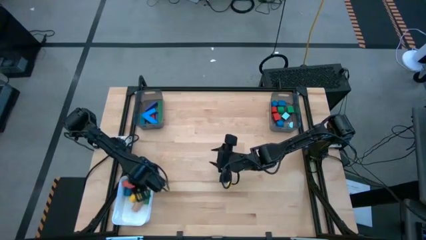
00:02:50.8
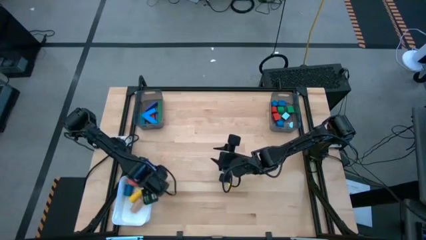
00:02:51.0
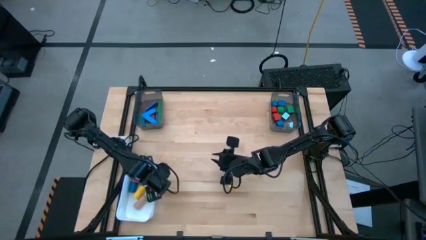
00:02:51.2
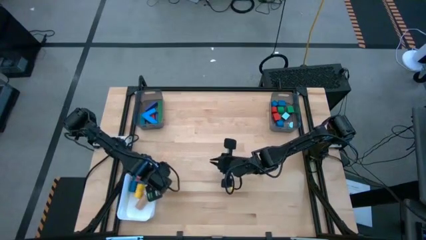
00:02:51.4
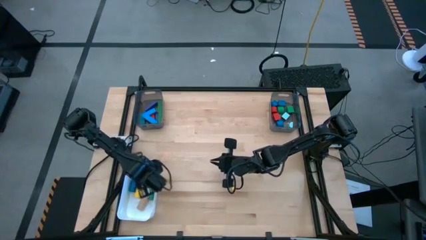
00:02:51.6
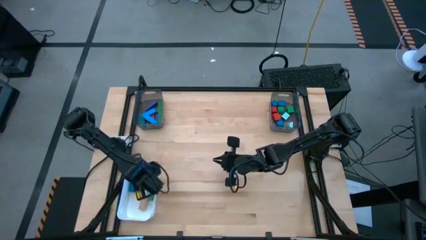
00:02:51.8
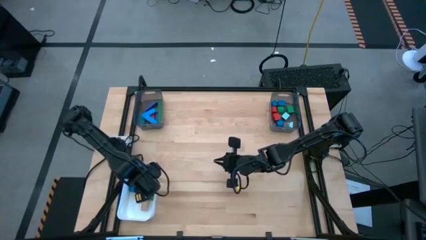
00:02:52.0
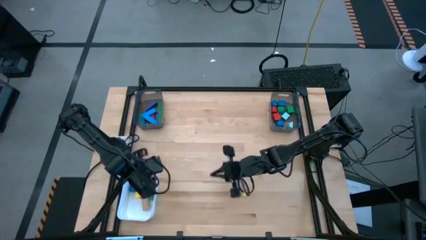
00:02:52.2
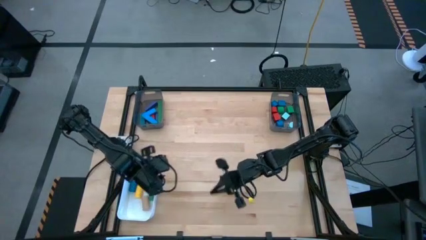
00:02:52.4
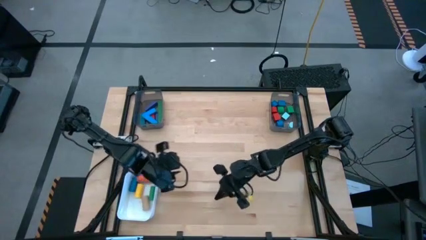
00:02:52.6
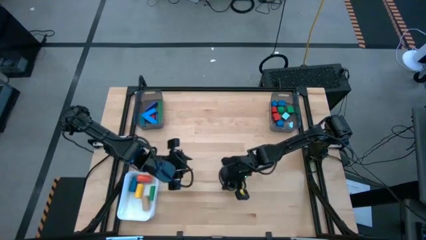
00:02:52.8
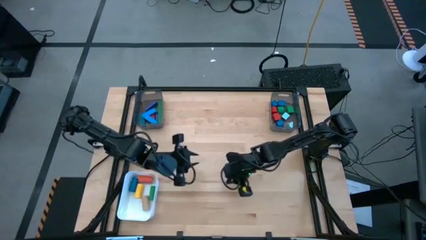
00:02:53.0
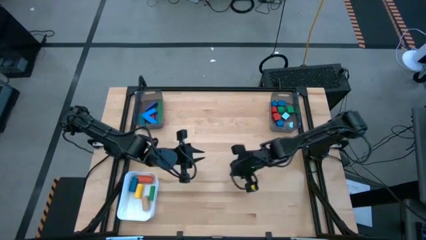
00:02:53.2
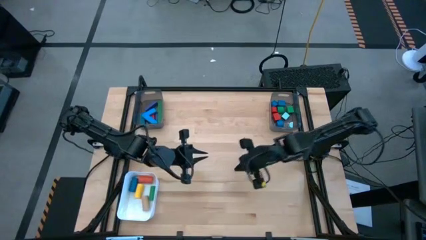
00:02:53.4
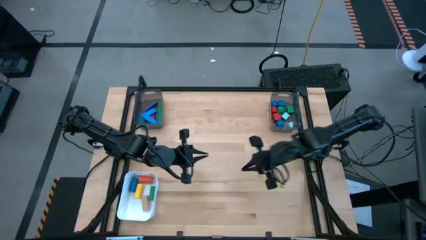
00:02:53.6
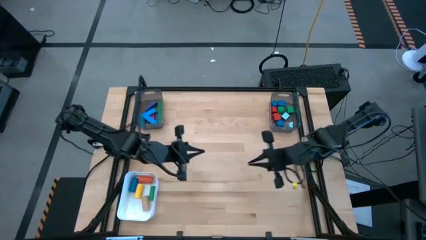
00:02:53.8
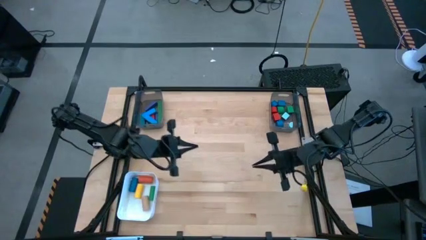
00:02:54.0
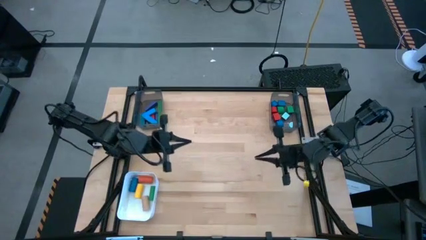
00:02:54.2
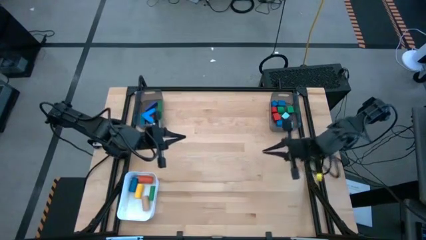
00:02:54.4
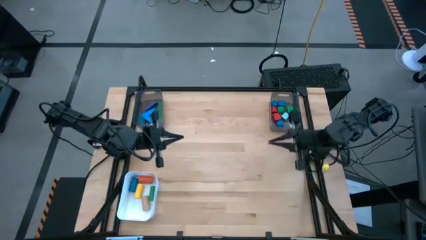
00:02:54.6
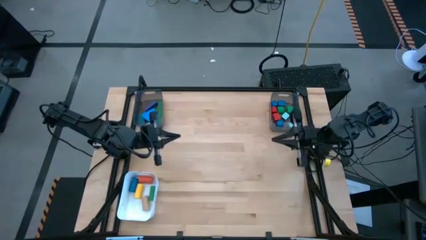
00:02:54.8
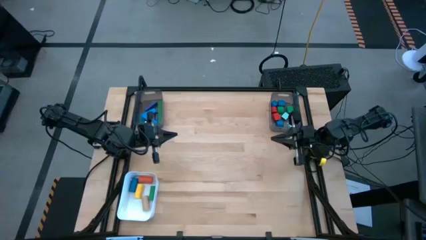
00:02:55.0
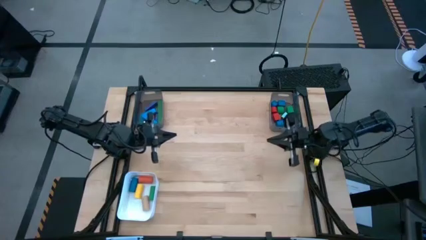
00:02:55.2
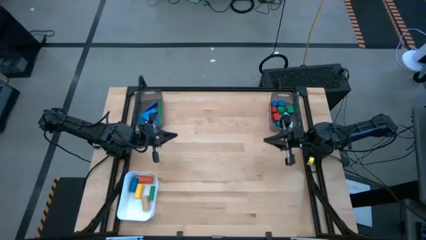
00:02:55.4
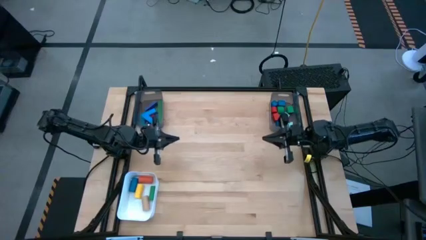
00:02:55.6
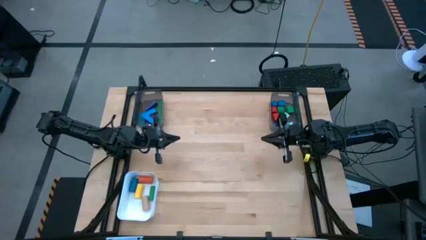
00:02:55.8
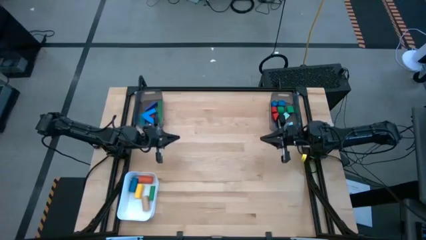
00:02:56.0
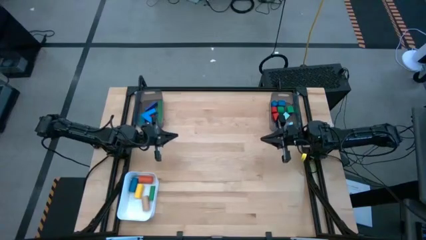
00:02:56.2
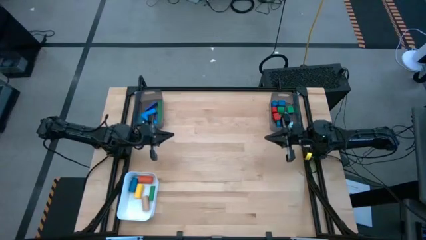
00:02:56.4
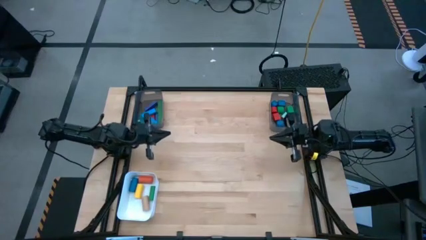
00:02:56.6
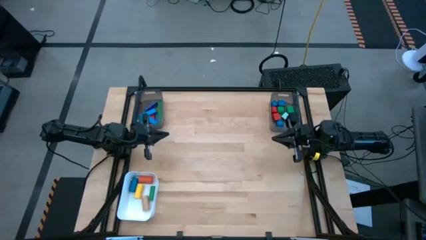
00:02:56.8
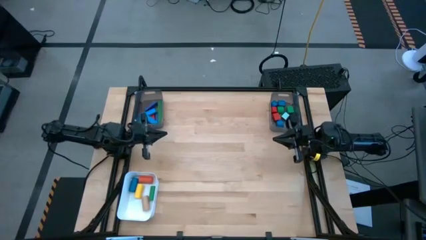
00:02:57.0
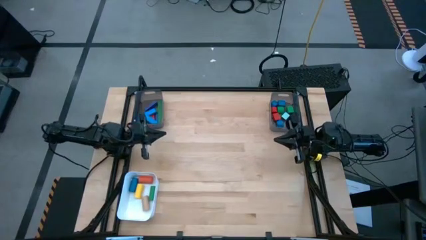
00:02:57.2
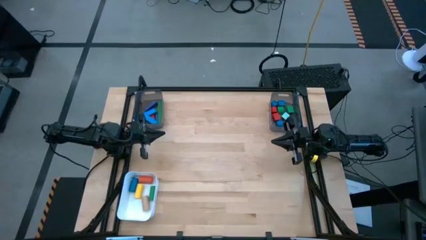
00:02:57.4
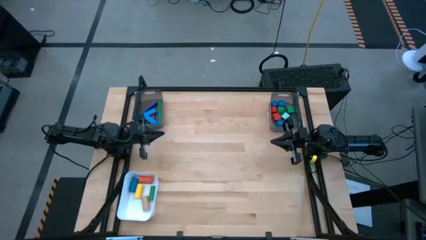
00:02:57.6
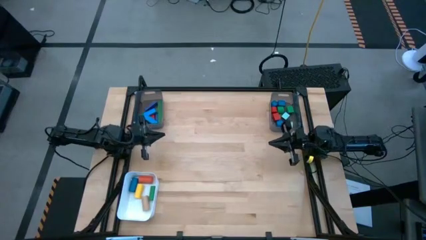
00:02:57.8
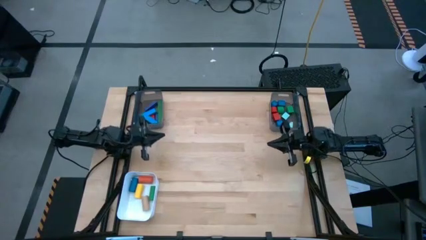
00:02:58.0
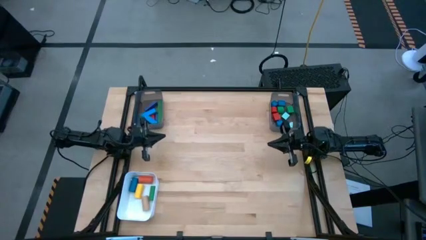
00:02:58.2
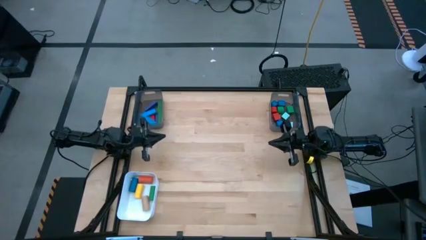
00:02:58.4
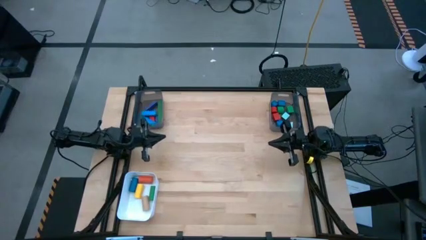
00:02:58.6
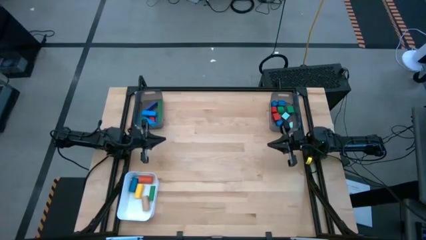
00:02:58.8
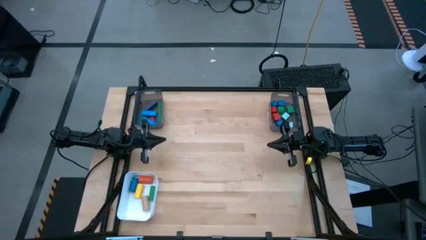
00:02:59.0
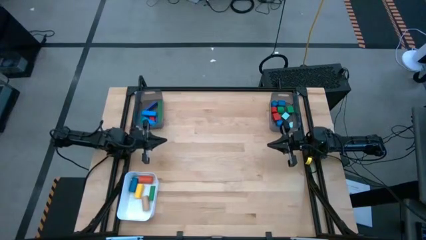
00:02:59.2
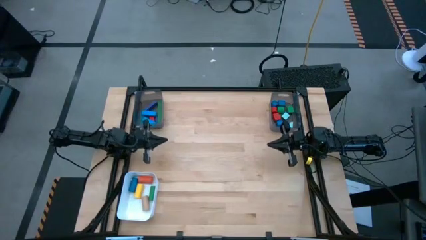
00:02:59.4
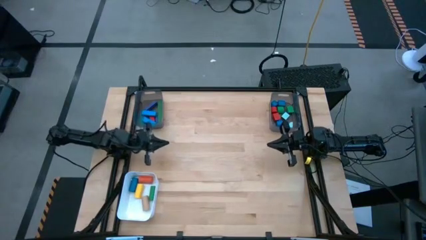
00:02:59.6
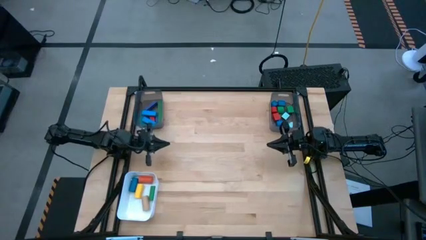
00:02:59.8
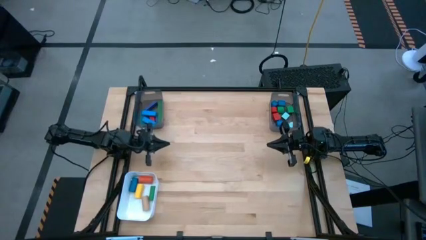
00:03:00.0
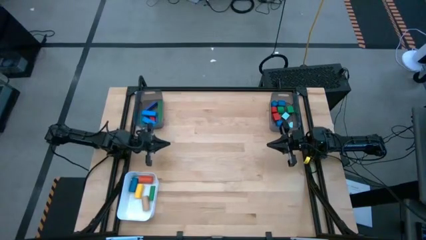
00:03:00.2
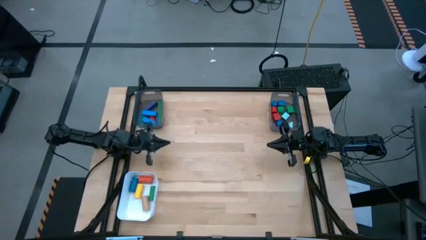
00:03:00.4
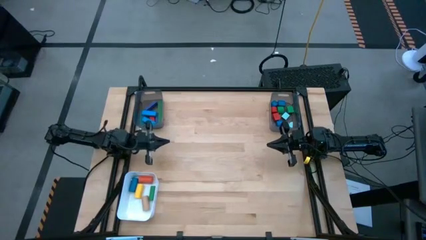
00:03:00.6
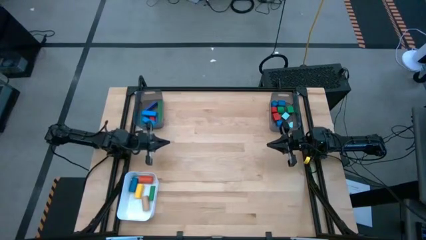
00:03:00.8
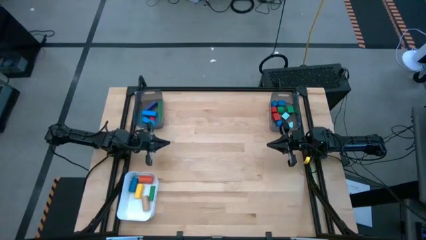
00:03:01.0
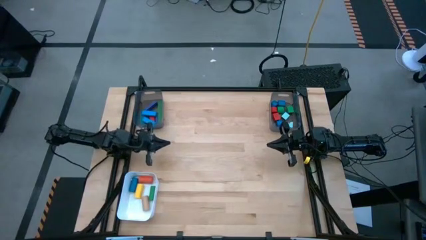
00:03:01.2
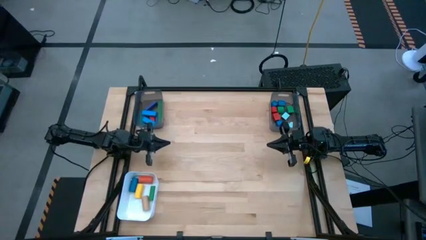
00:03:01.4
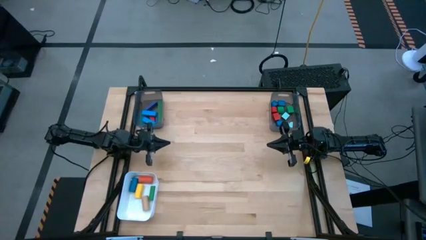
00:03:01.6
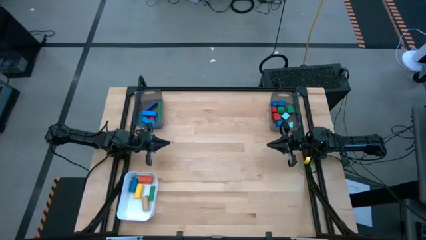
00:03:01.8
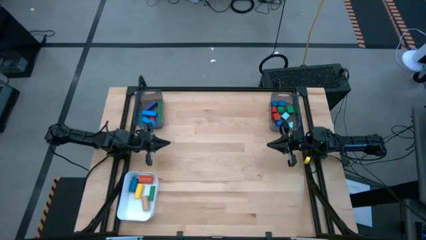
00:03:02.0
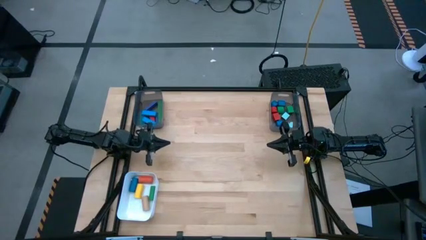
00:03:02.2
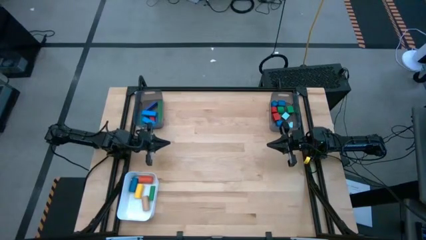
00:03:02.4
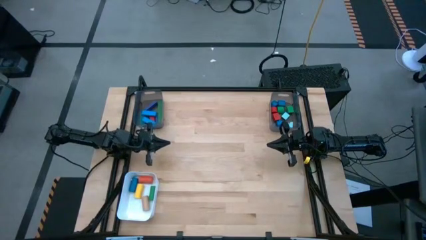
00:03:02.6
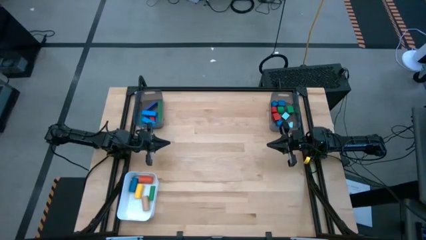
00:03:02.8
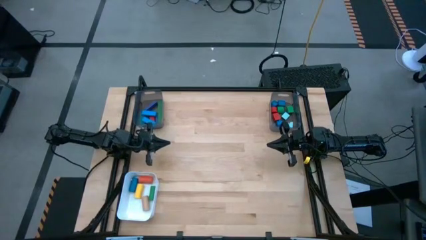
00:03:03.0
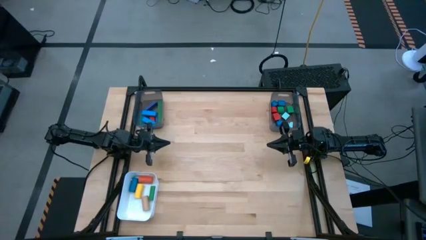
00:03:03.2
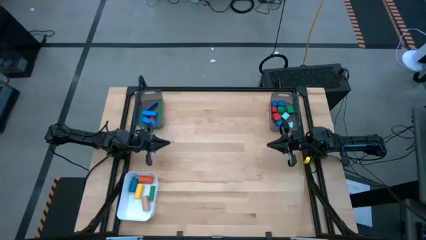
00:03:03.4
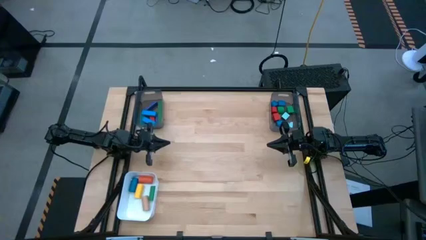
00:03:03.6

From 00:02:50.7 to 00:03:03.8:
Task: Sort blocks by size
Return to Home Position

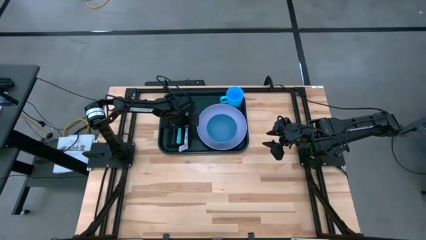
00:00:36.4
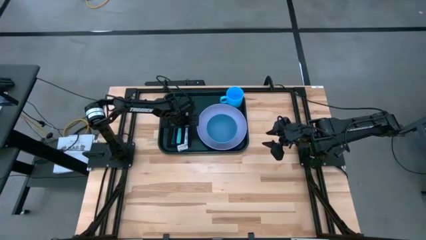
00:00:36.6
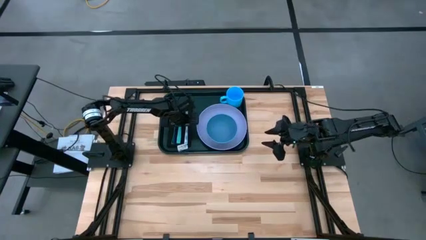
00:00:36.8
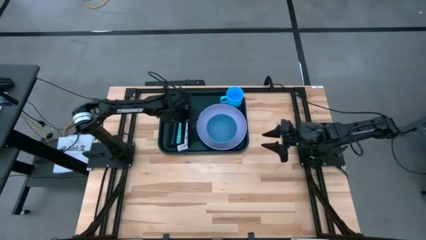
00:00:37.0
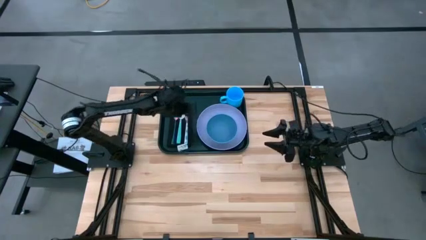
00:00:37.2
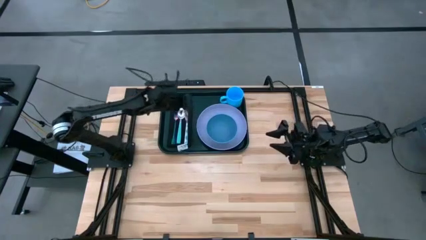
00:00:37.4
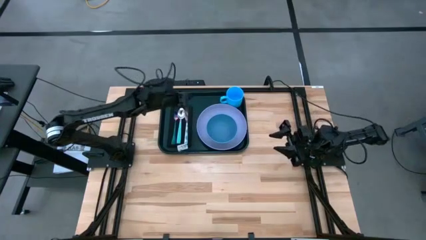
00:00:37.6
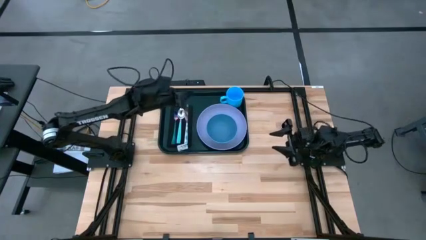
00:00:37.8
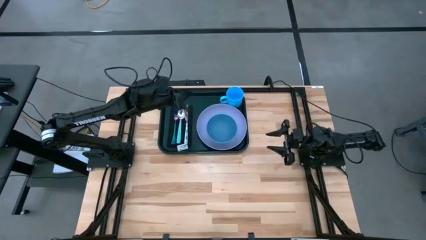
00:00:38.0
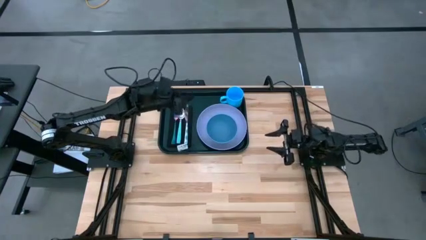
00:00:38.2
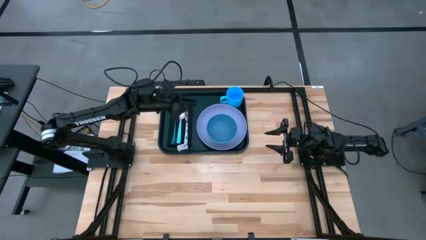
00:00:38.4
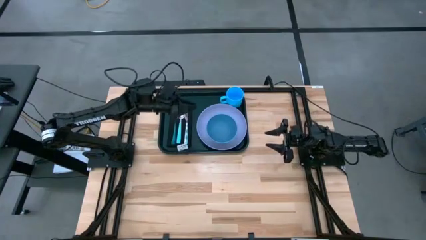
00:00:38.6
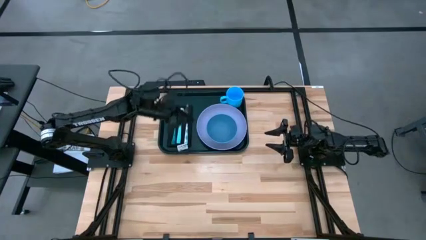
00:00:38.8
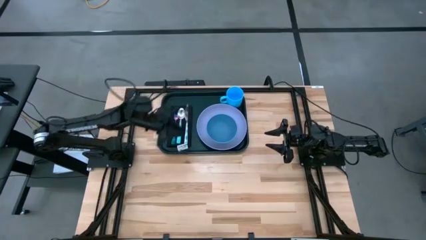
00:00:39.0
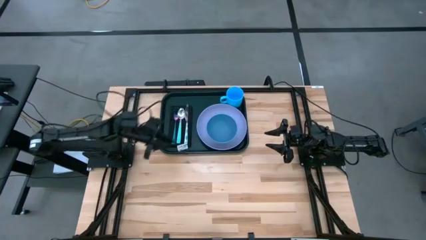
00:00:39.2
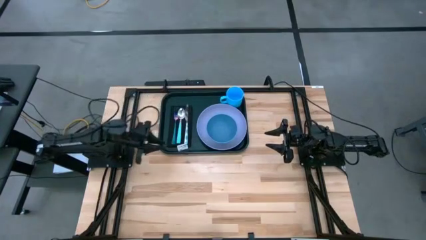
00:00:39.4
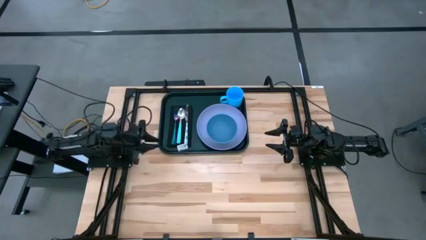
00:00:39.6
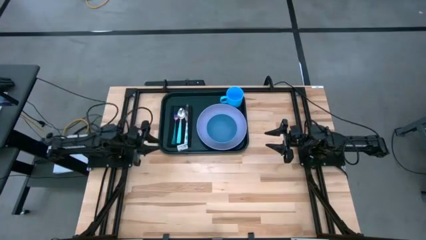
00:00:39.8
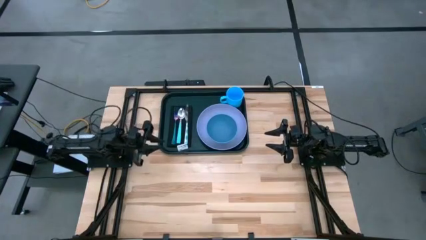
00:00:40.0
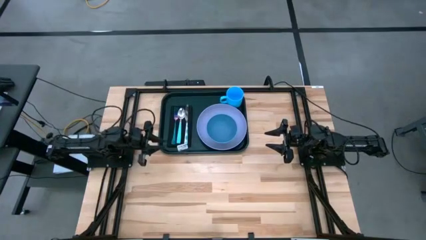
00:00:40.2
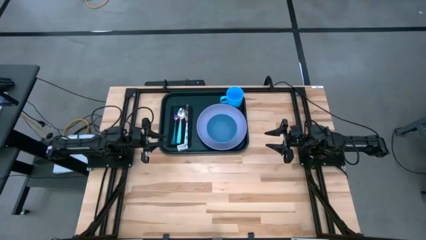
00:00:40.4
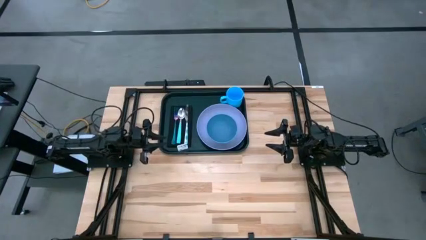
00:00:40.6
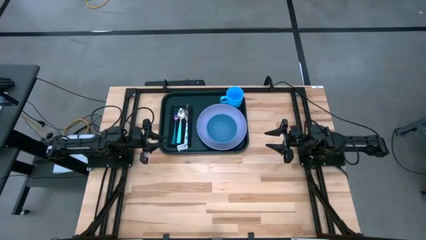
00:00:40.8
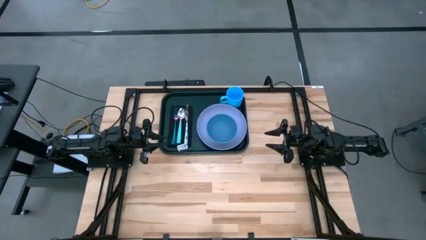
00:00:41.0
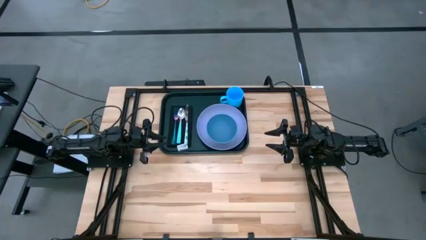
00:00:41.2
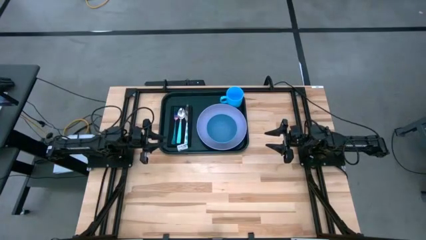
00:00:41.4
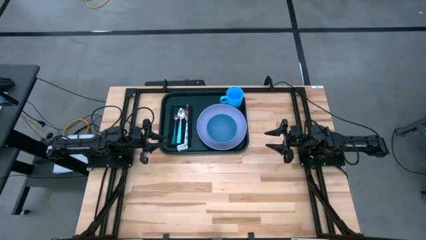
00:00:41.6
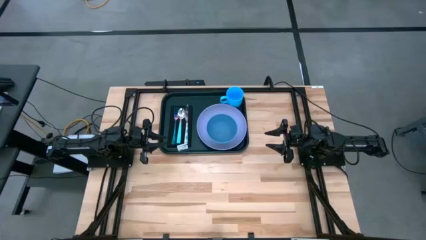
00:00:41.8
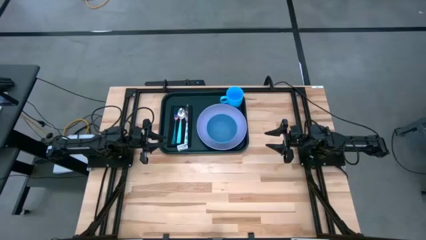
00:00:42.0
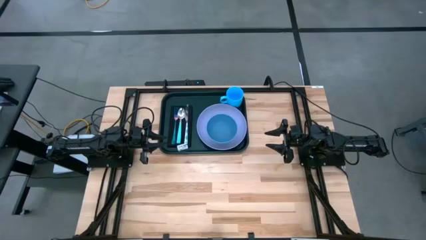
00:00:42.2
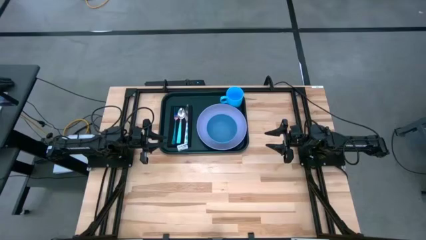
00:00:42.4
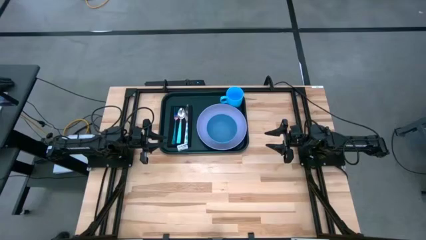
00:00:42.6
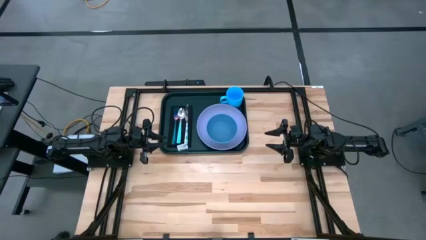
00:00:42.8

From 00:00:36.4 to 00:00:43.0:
Task: Set up tray
Return to Home Position
